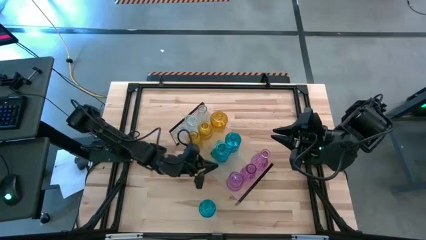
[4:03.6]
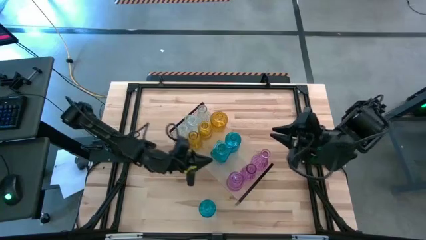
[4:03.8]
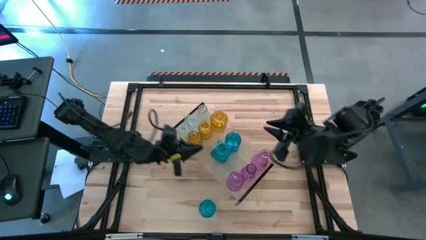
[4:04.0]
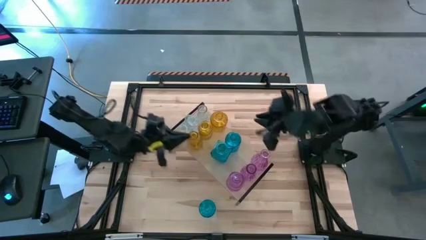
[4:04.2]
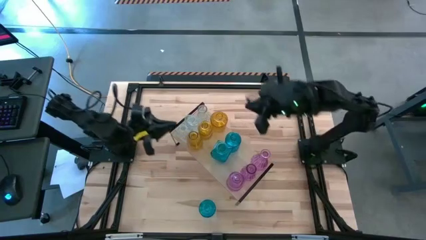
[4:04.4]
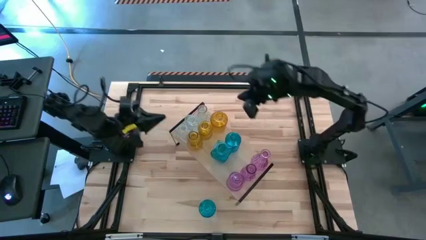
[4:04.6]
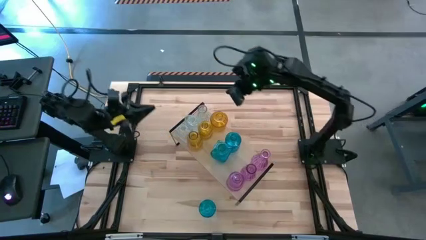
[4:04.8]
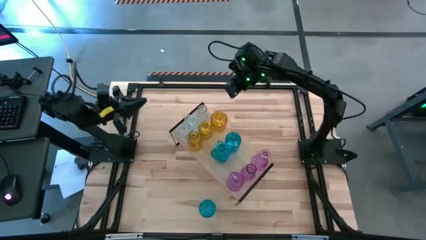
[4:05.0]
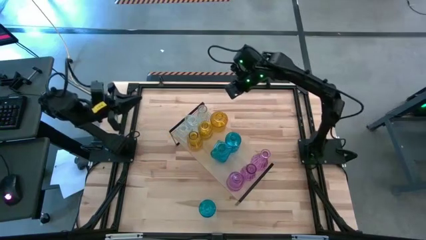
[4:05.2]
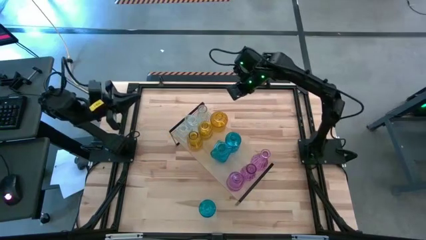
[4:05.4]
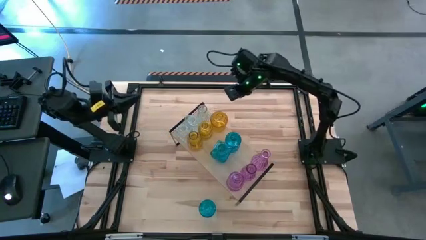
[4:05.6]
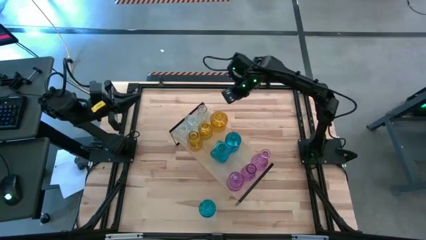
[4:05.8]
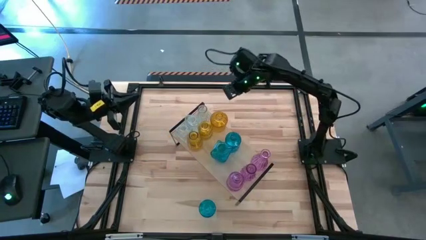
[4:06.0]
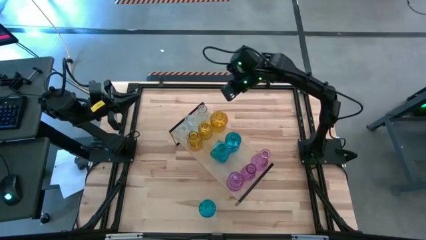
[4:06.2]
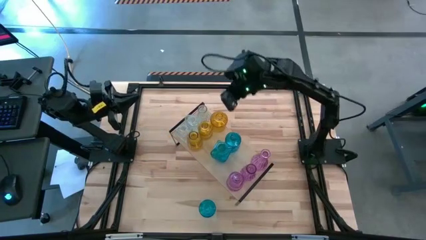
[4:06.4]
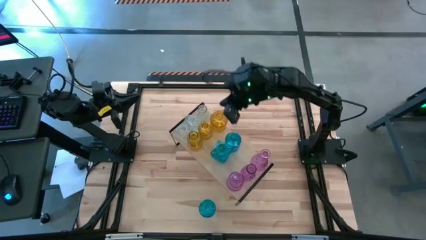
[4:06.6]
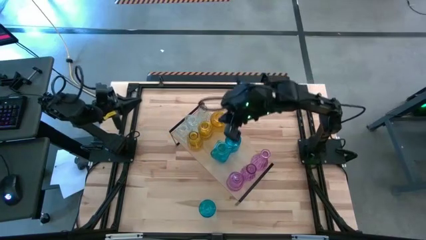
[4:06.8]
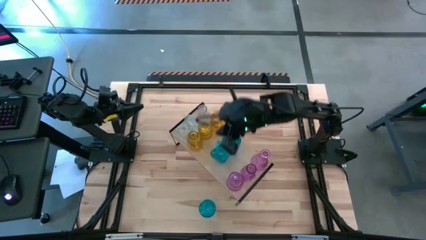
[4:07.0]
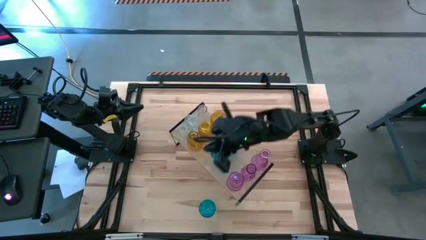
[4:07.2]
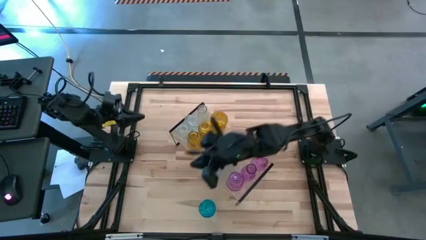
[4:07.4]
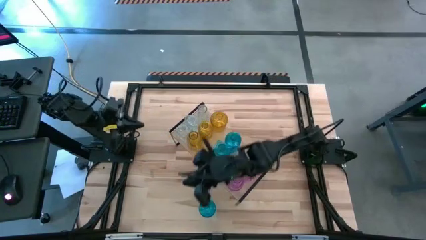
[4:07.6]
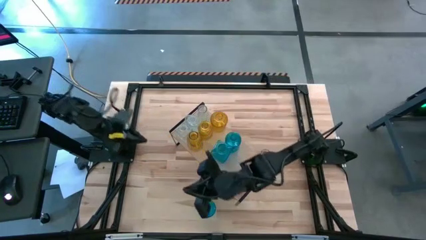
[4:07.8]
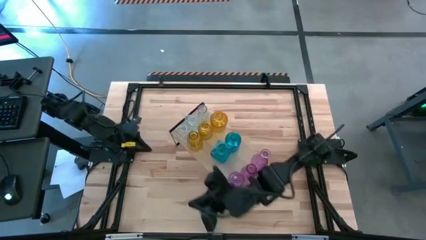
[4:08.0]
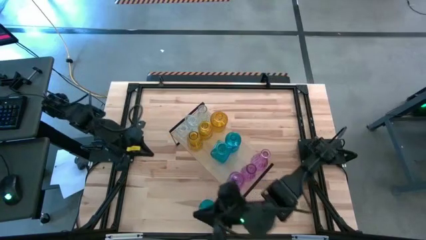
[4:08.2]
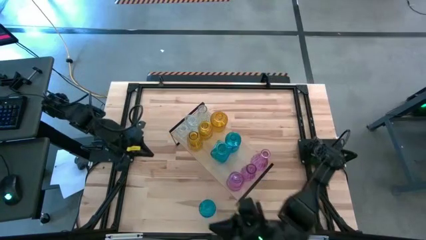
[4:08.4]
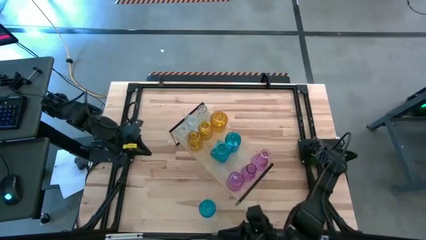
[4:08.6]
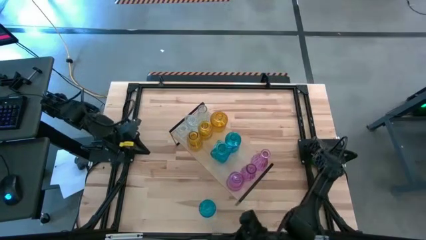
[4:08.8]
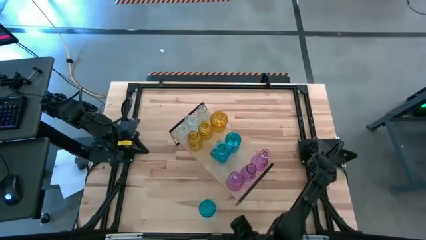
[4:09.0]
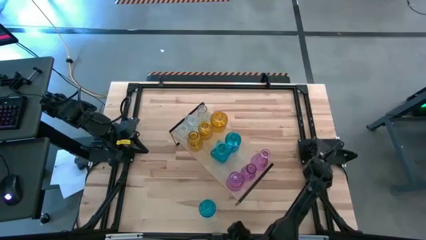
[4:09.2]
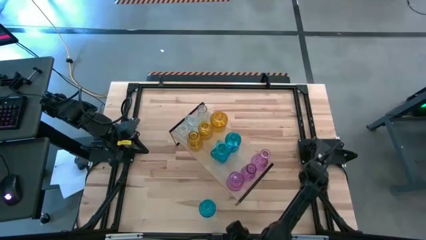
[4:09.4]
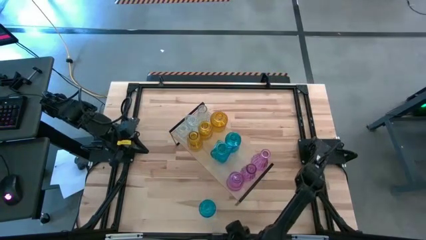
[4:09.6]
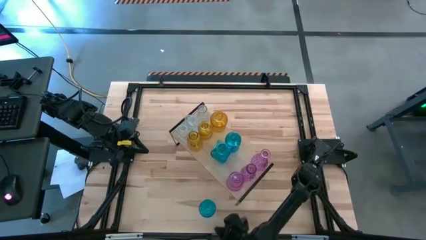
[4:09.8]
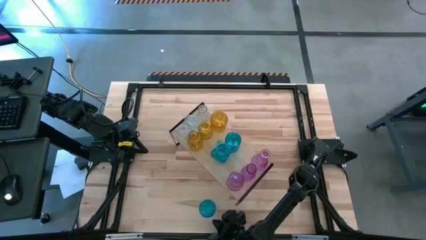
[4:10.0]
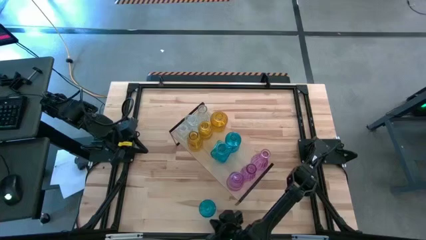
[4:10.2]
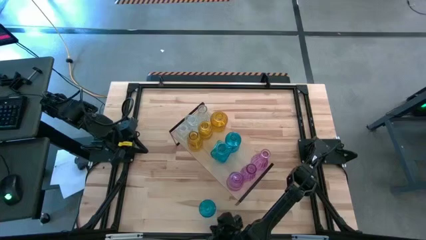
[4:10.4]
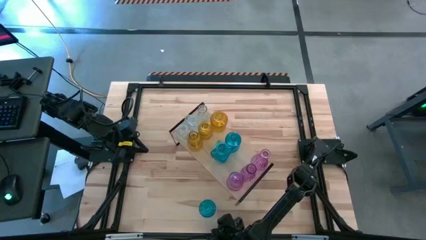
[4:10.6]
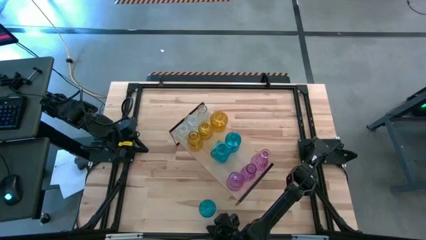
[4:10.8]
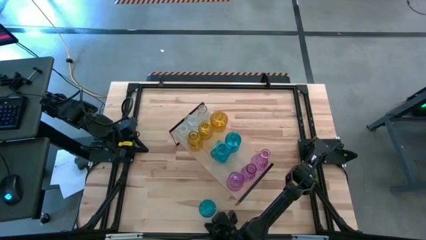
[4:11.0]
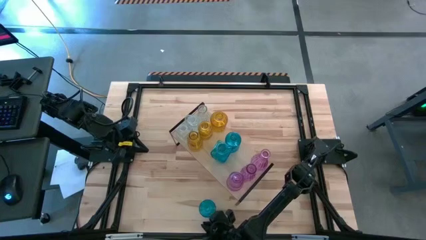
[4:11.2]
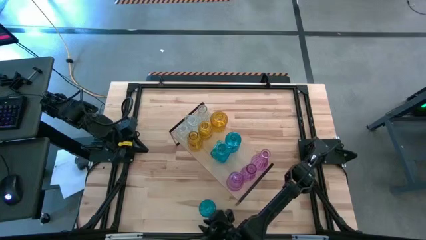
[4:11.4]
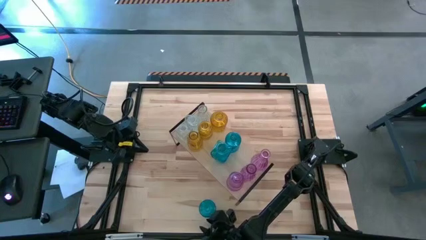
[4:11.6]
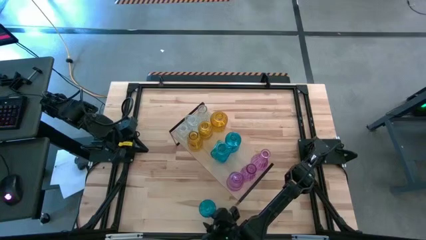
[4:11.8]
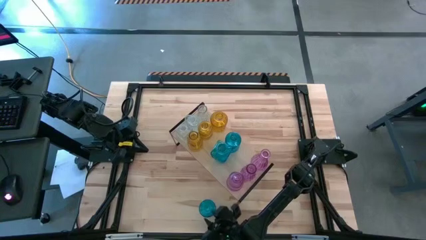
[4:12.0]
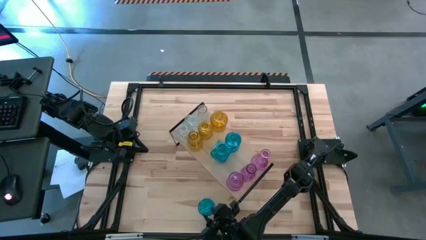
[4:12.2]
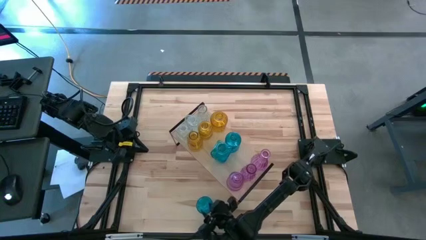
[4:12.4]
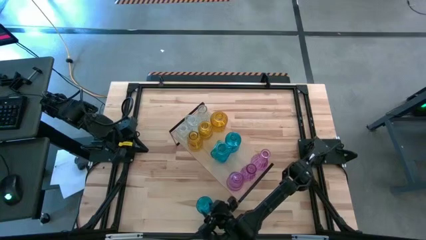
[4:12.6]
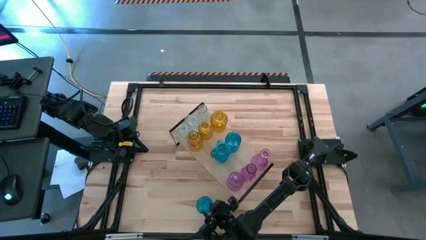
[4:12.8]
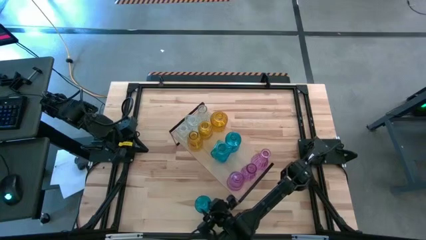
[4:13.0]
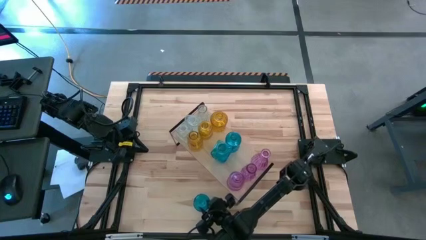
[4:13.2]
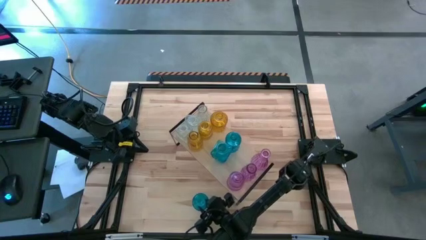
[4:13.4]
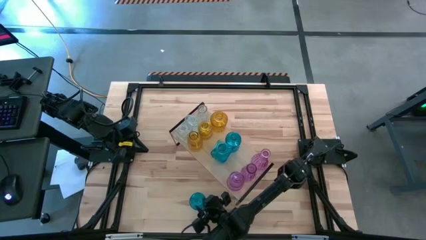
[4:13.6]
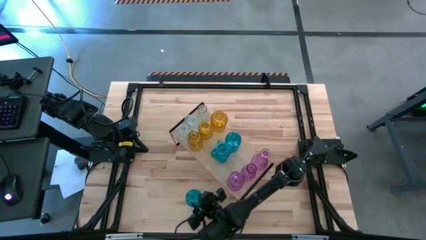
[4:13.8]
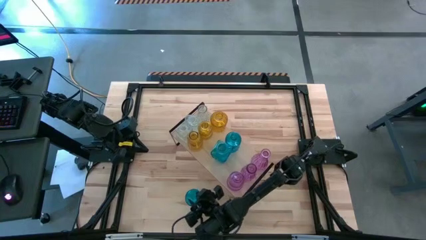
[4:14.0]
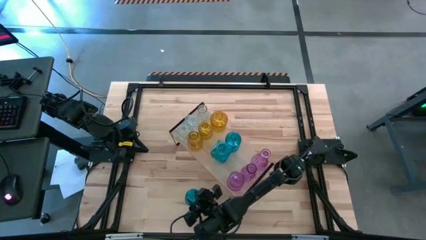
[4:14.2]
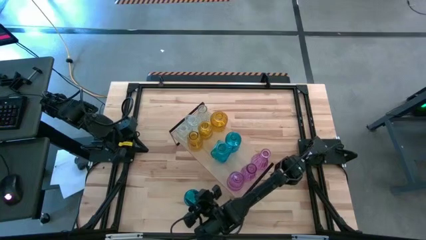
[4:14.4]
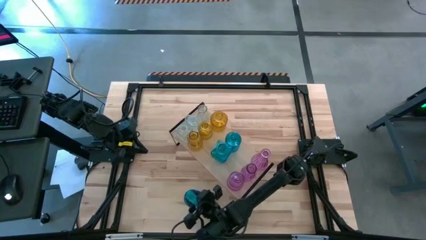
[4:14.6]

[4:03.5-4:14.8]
Task: sort vases onto shelf
Put the blue flower vase on the shelf aligned with the other blue flower vases

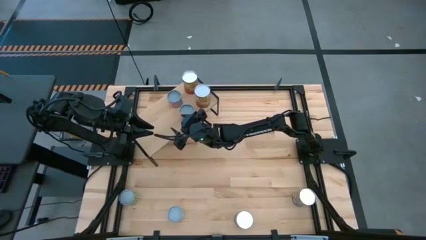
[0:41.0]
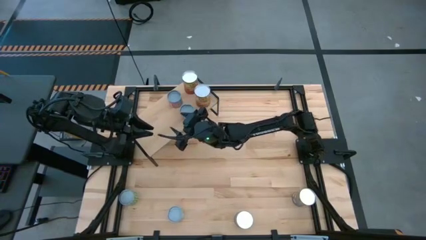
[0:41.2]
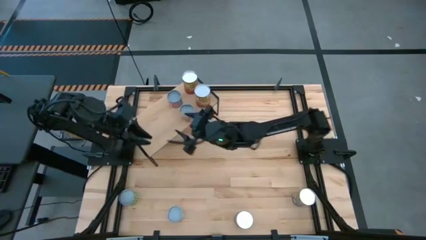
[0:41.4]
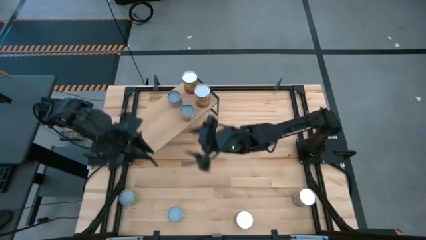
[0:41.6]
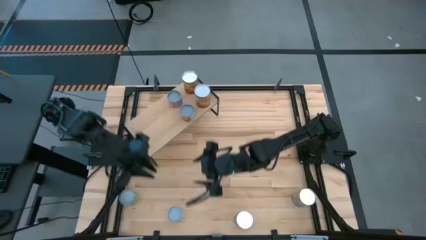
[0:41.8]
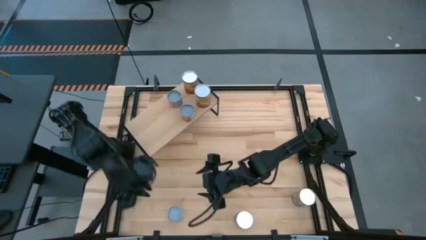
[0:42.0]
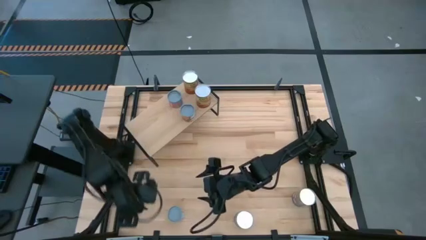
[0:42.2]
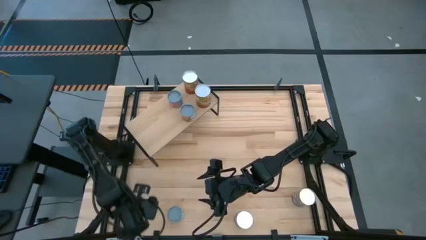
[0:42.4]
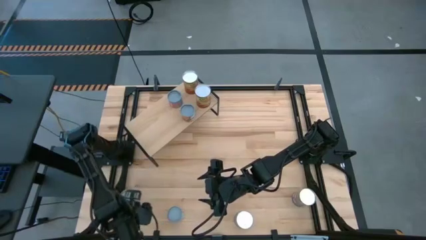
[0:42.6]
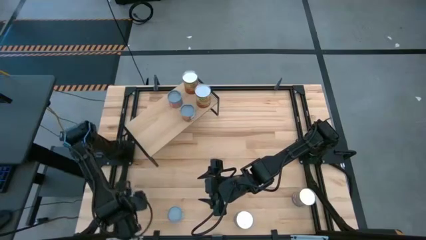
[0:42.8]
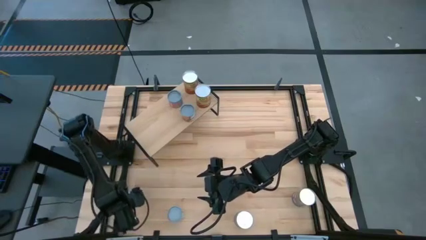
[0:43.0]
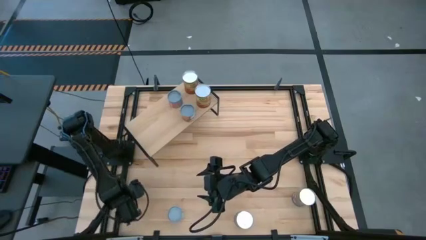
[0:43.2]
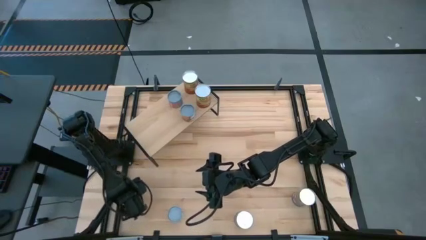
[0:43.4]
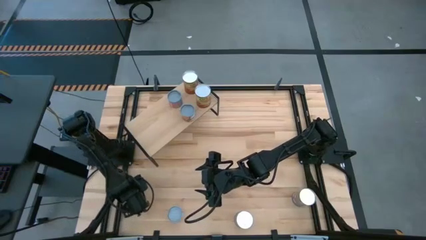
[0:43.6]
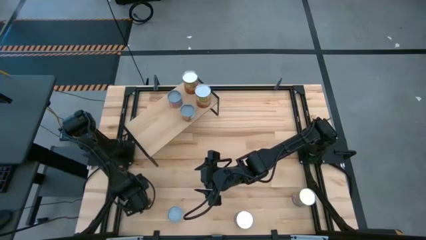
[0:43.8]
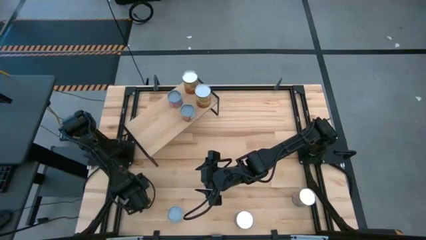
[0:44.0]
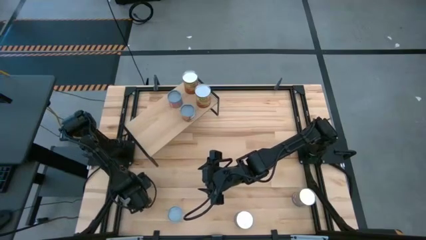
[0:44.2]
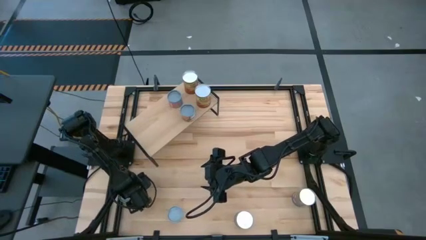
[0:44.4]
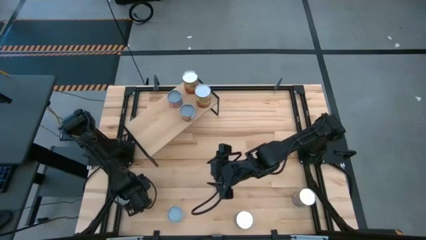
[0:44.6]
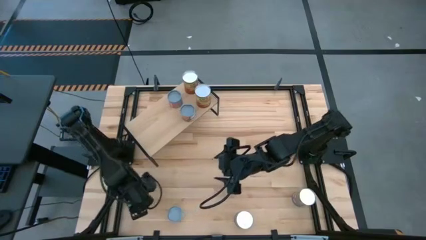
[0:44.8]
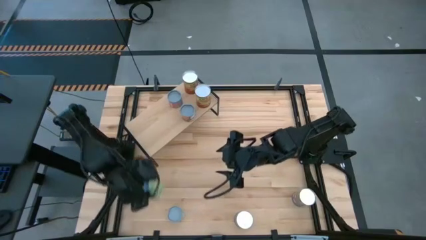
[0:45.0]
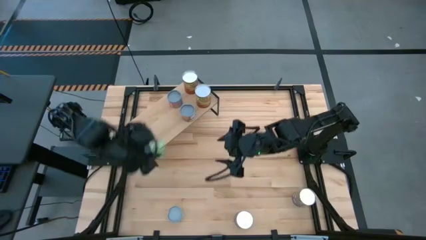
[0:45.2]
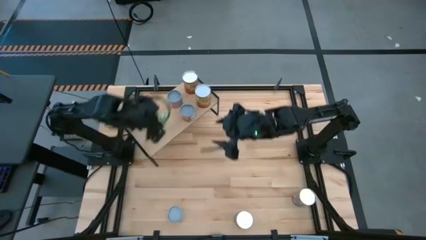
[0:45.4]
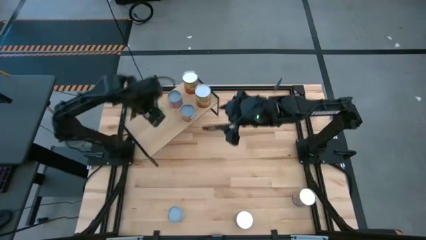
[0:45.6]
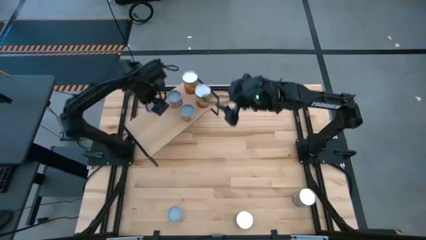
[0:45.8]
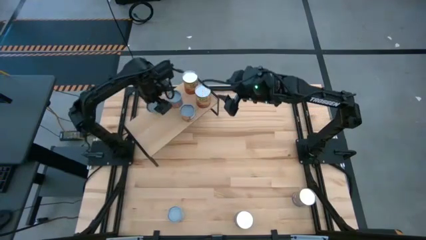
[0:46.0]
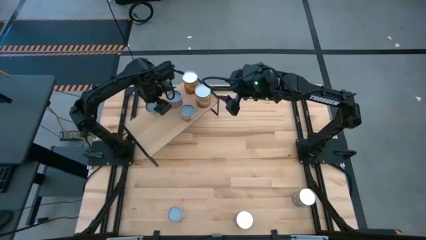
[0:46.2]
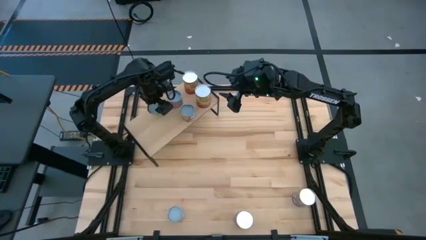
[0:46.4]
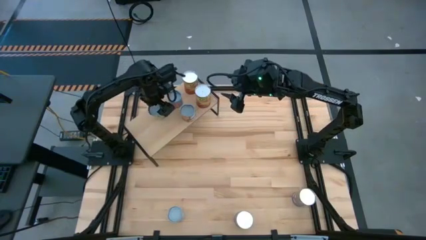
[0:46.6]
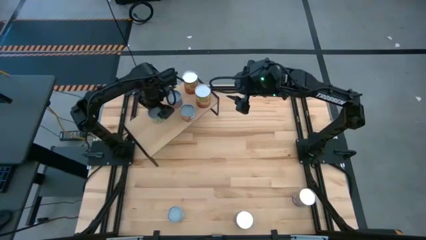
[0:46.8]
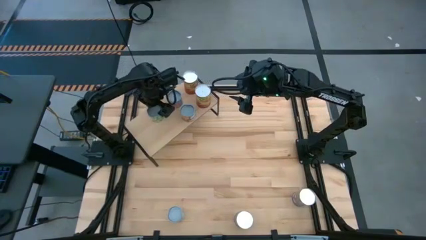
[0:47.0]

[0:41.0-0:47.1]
Task: Pick and place cans onto a shelf
Put the canned peas on the shelf
